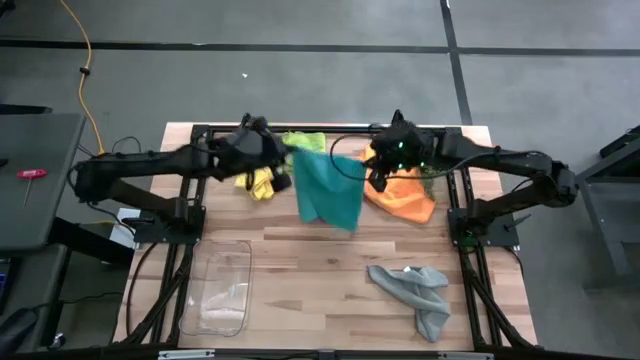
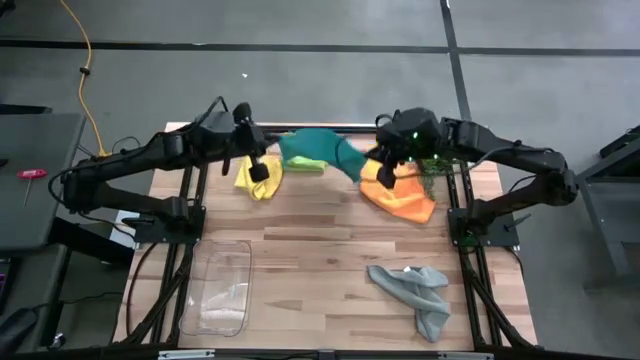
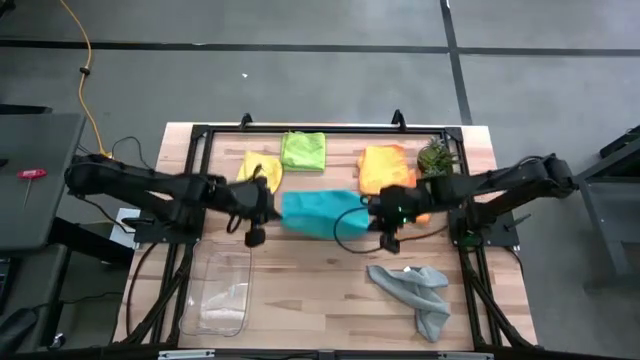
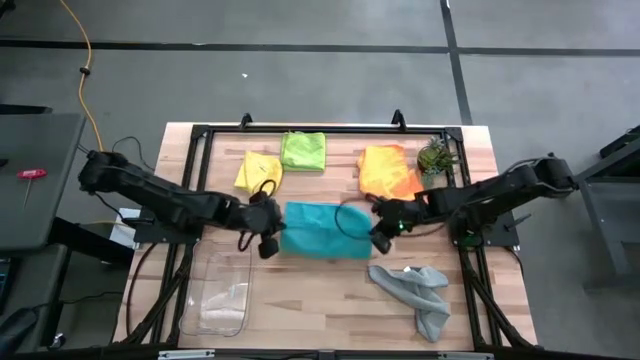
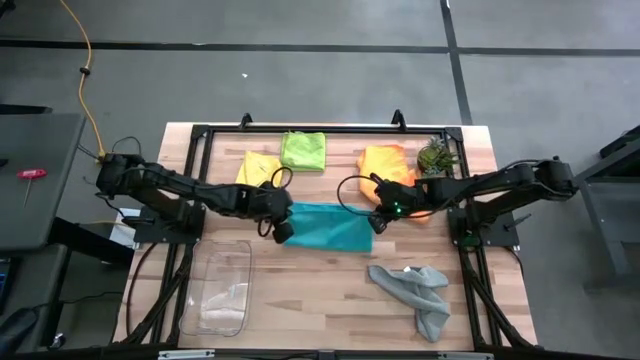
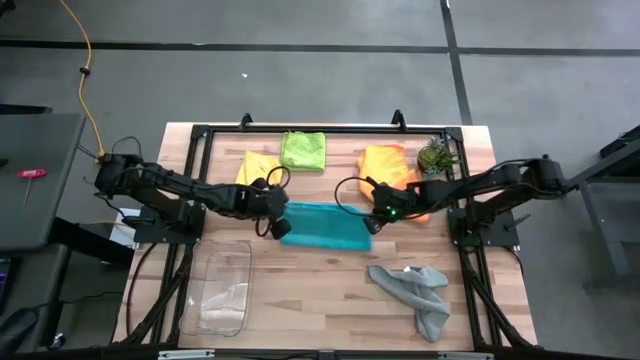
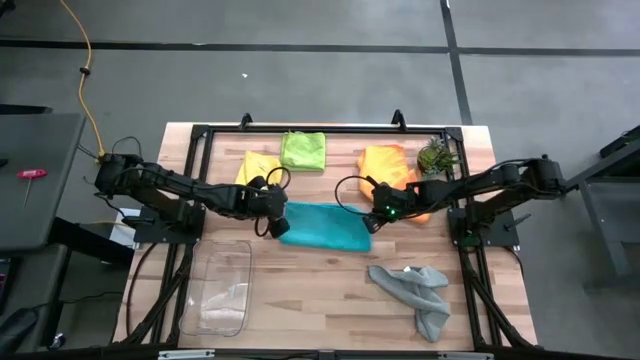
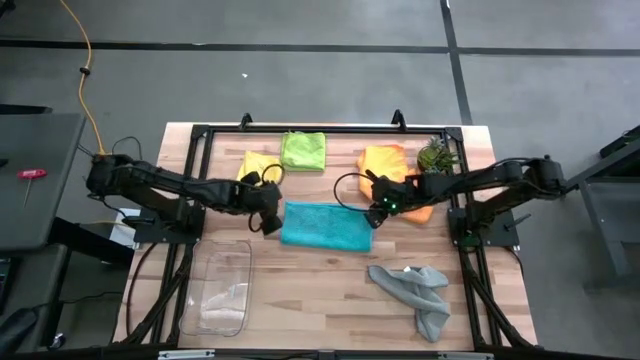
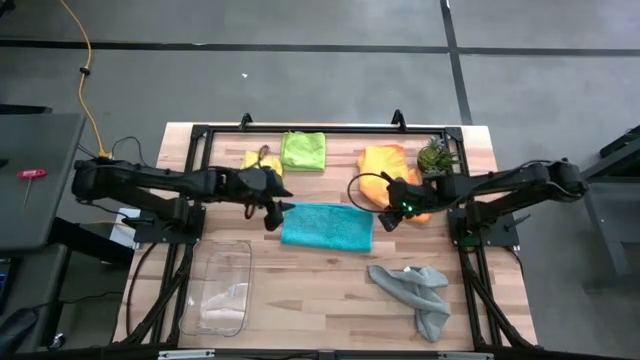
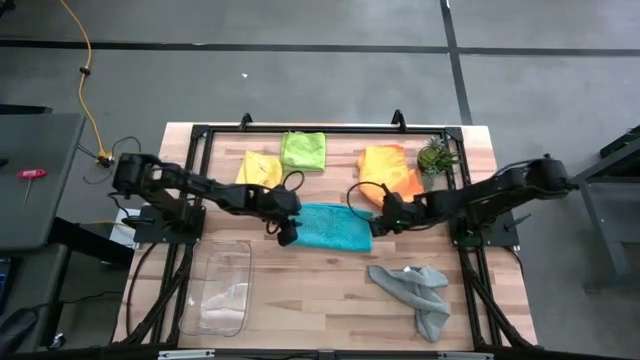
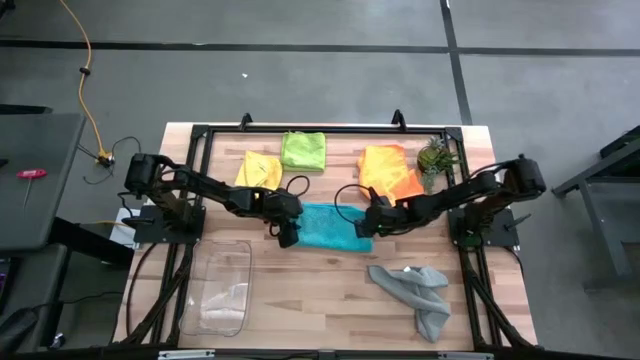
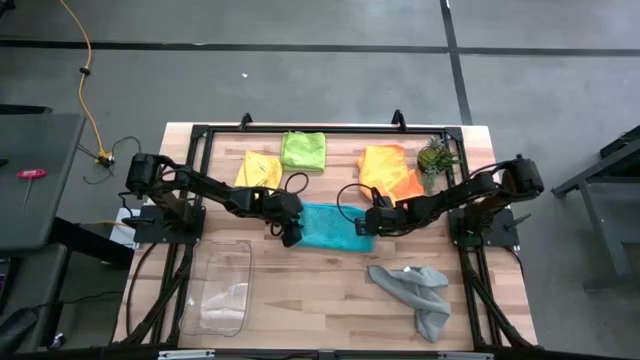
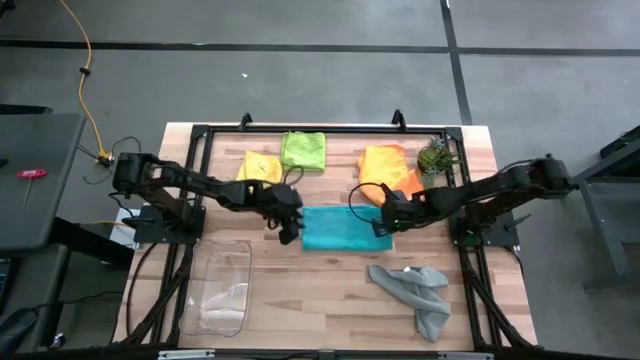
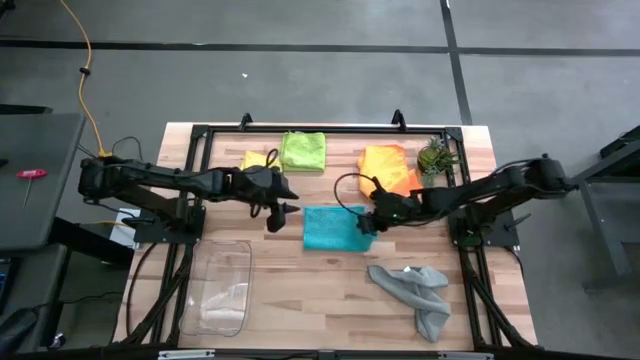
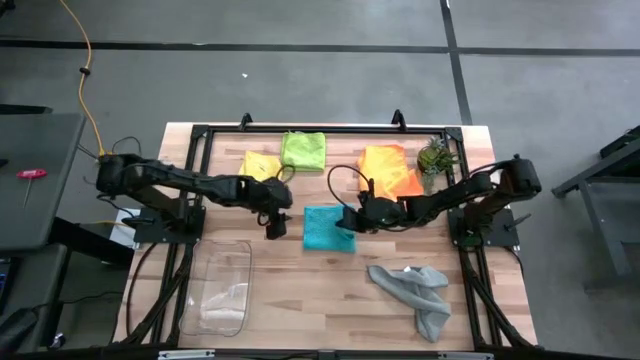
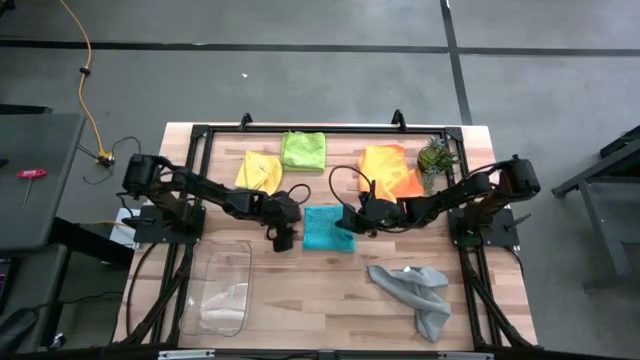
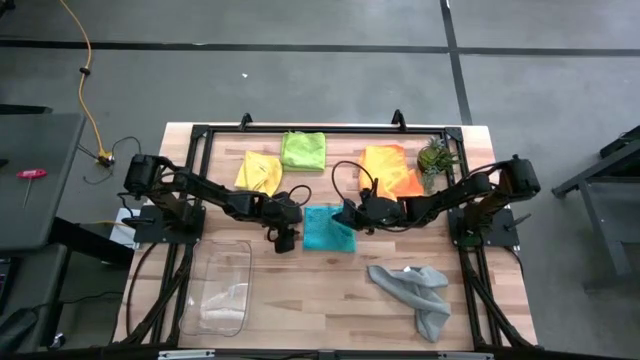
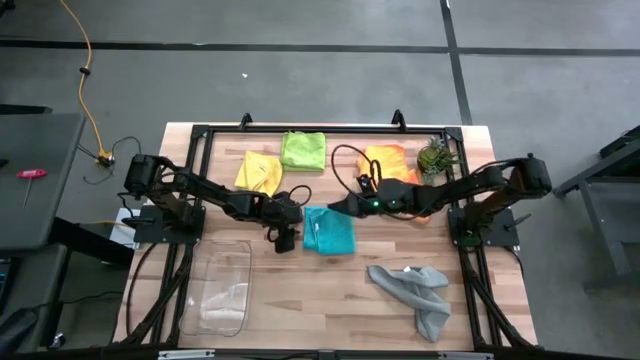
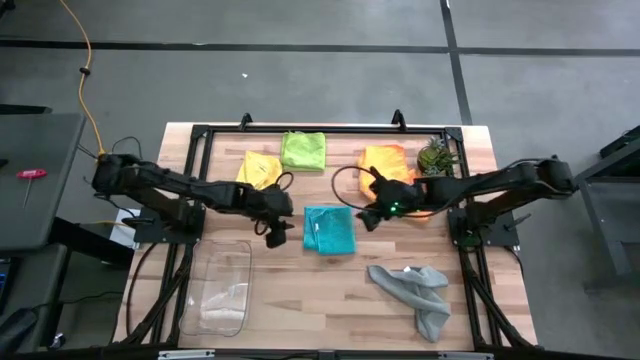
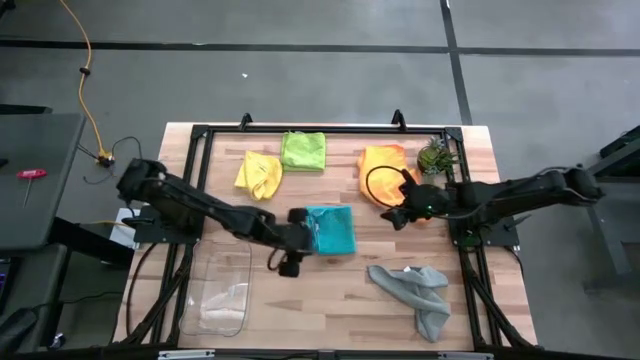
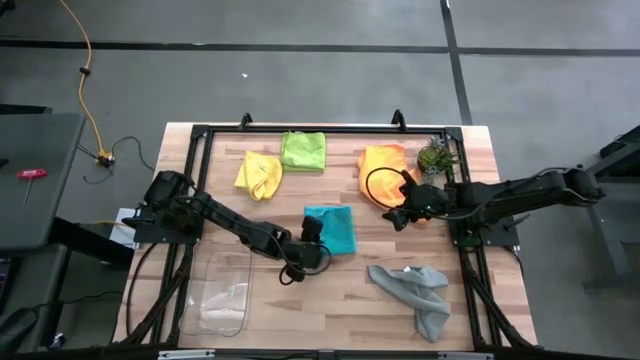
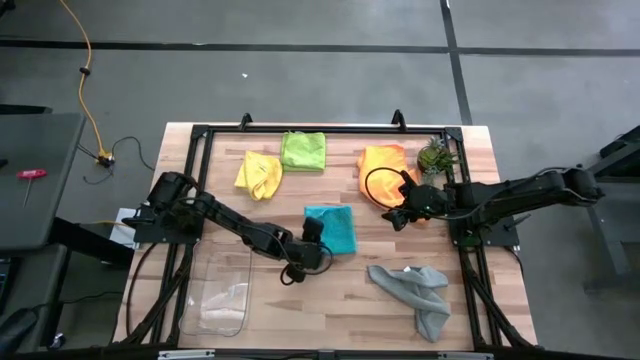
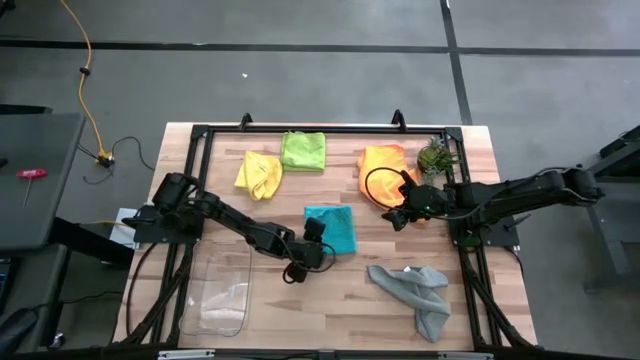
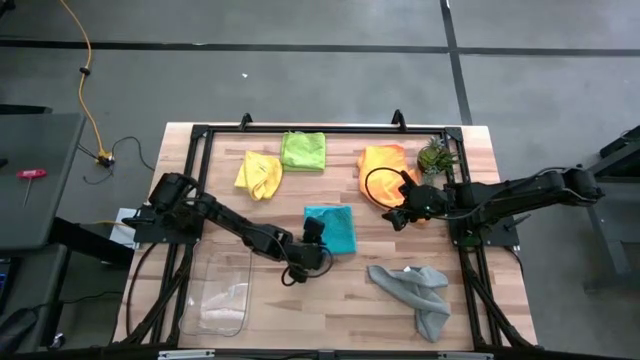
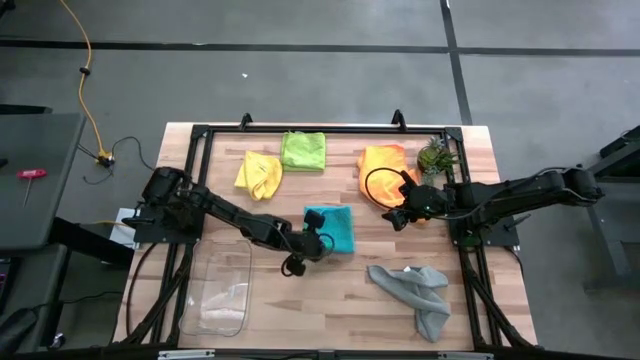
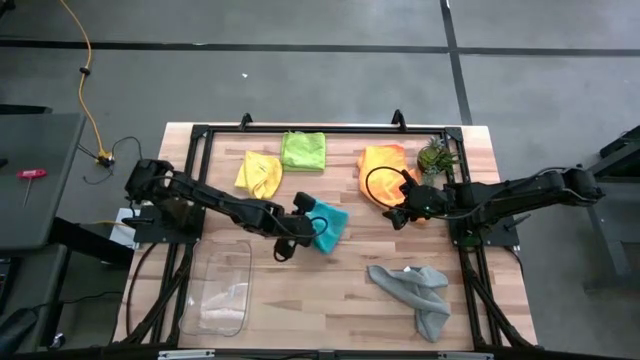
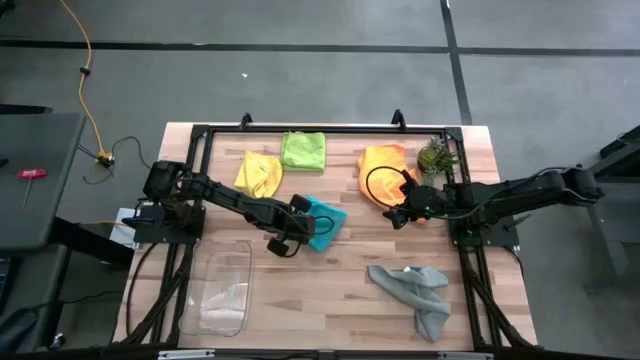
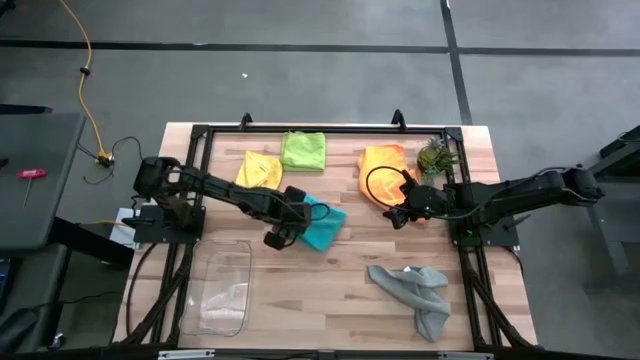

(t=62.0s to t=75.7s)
Task: Fold microfiber towels
Fold the blue microfiber towel

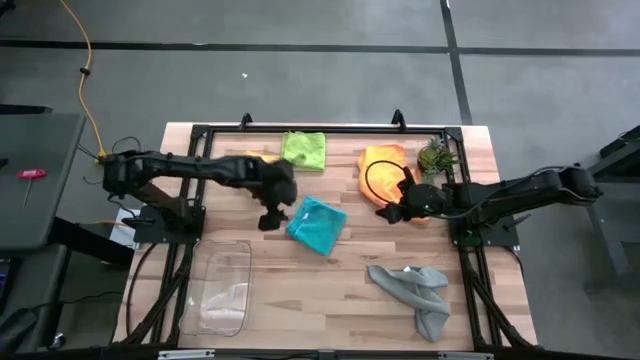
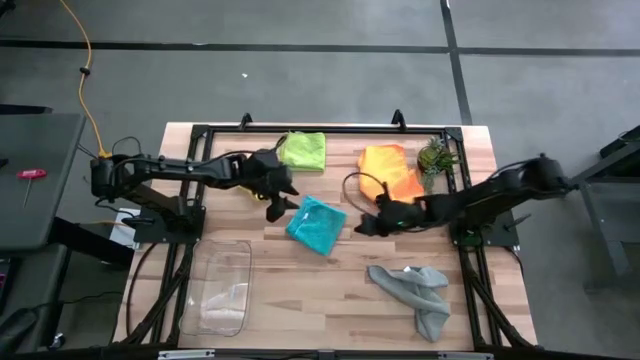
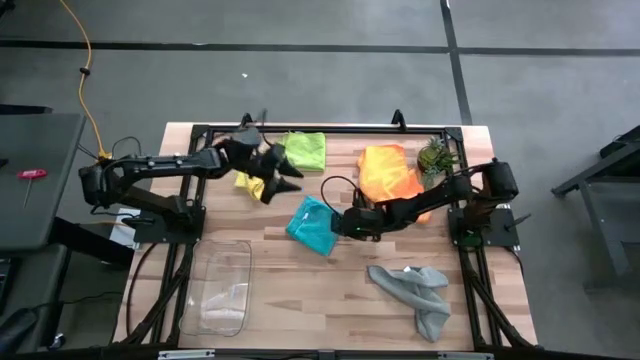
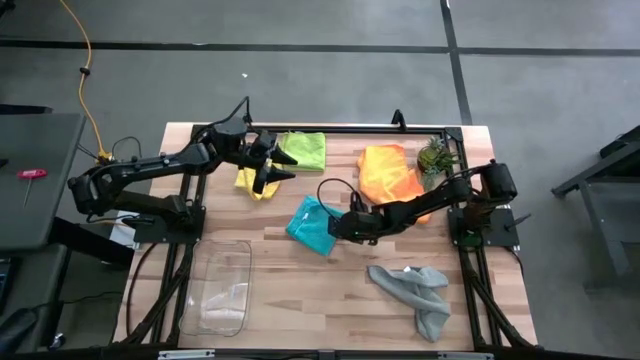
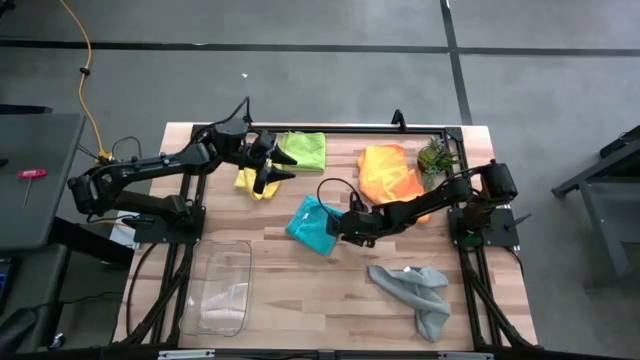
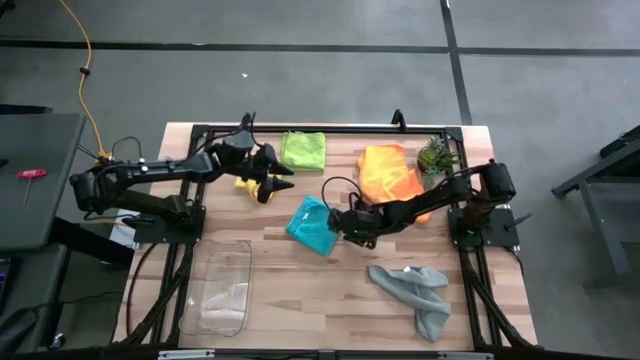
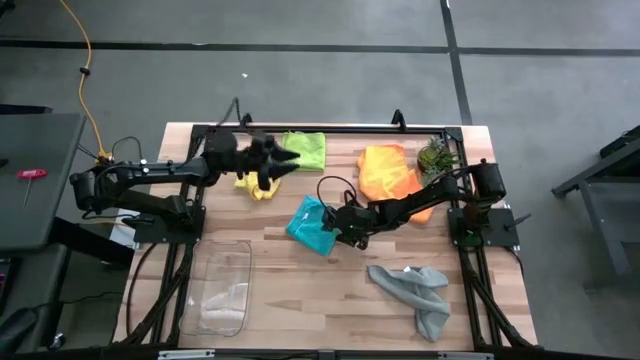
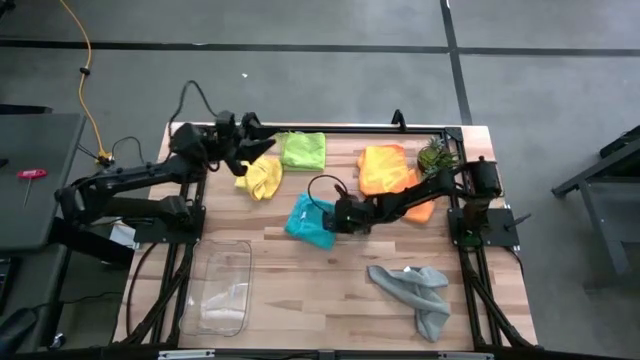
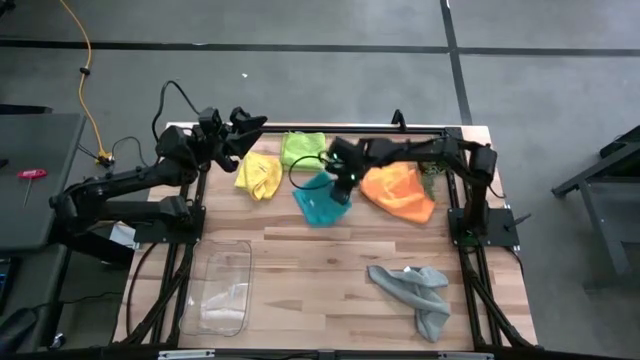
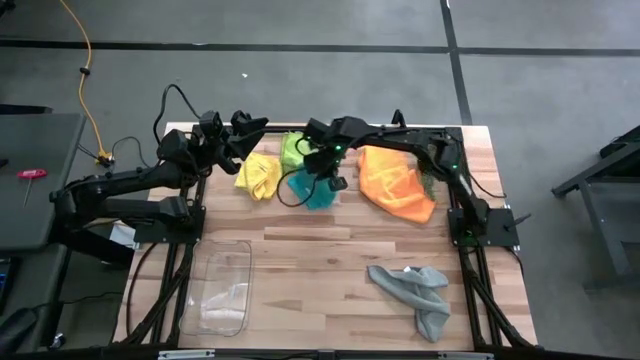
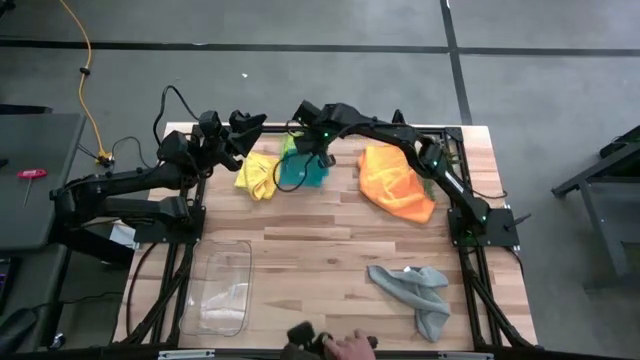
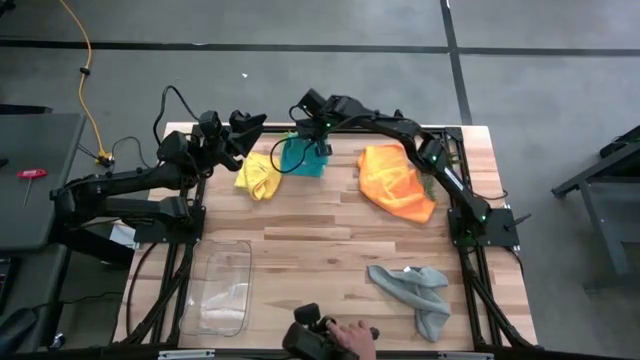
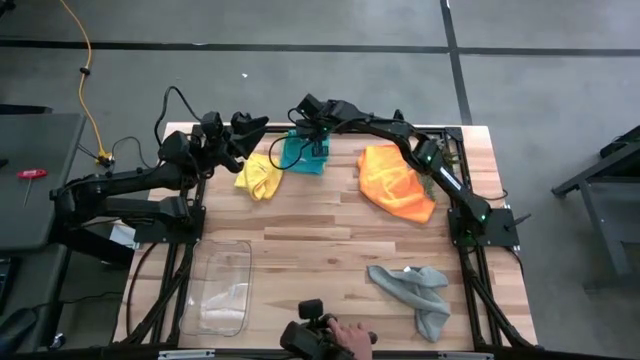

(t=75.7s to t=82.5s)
Stack the blue microfiber towel on the green microfiber towel

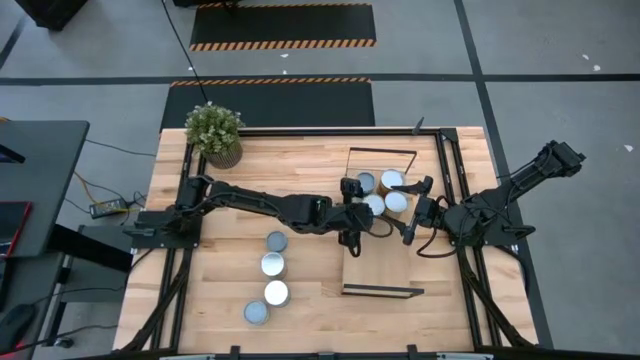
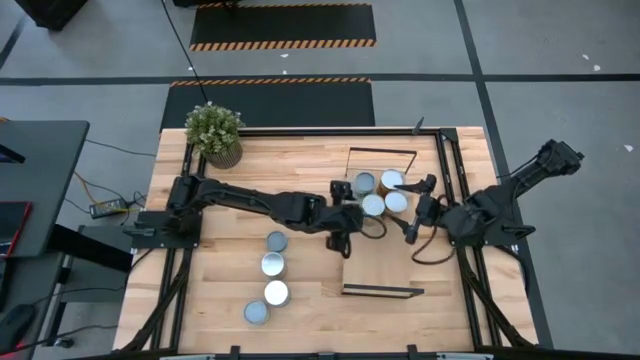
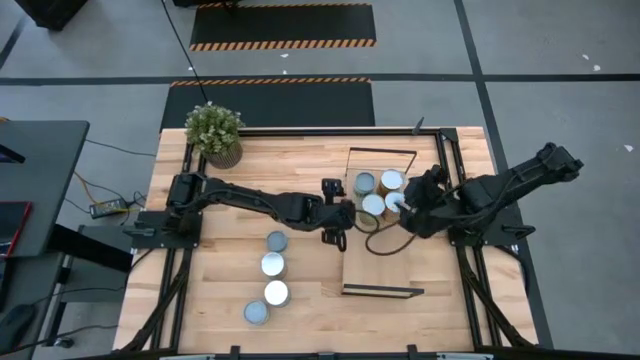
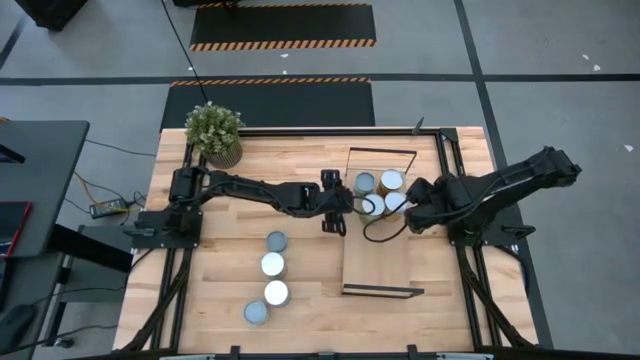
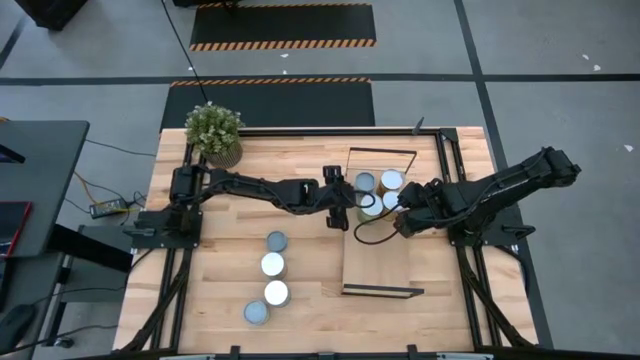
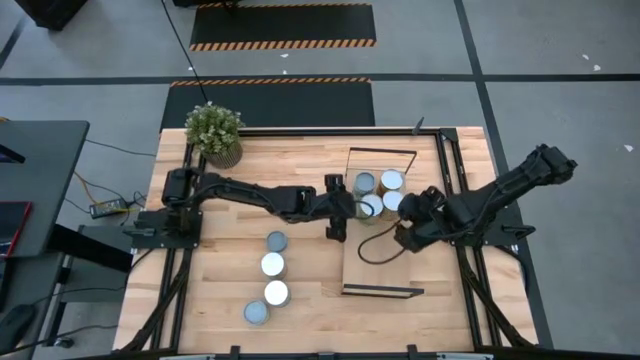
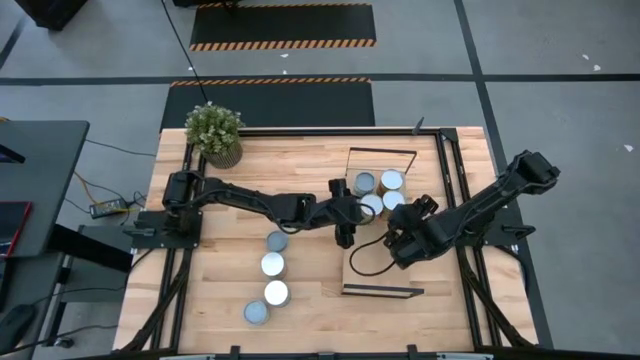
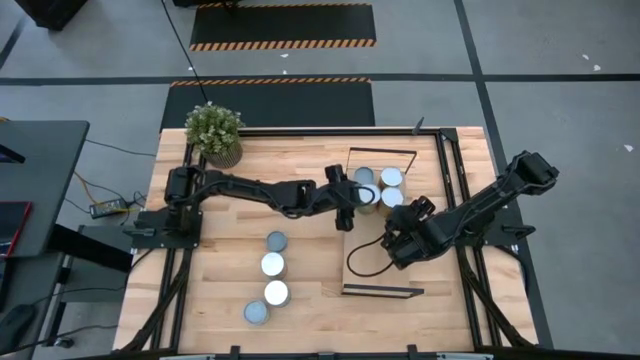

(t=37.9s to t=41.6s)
Task: Pick and place cans onto a shelf
Adjust the canned fruits on the shelf
